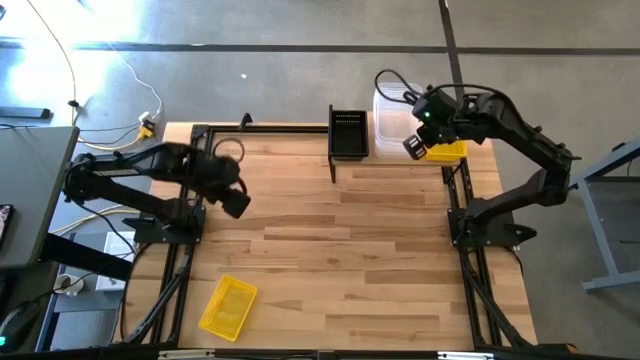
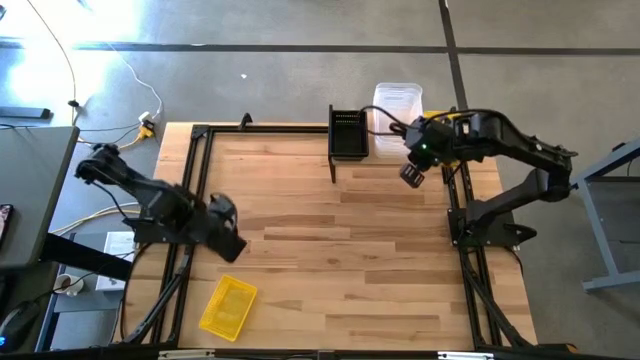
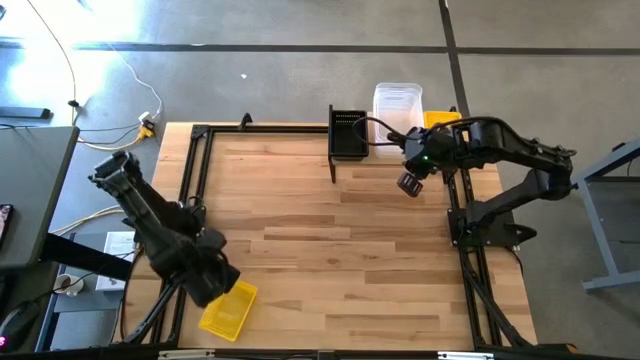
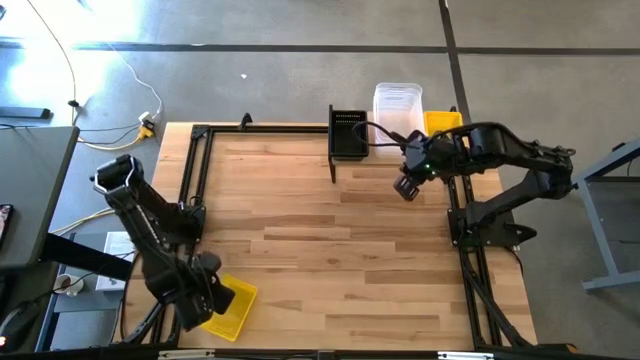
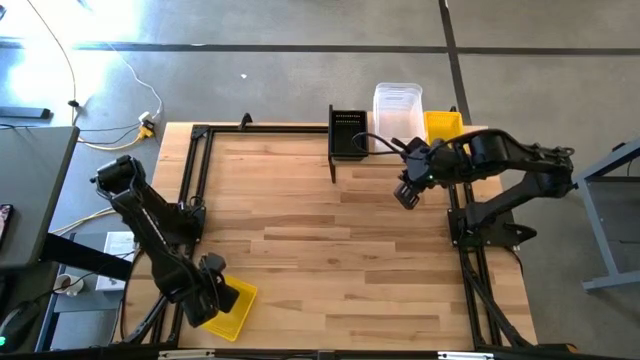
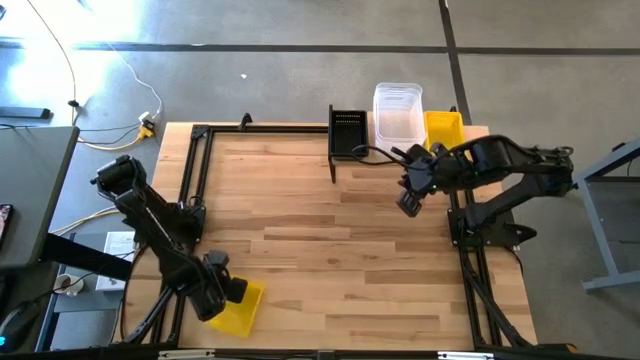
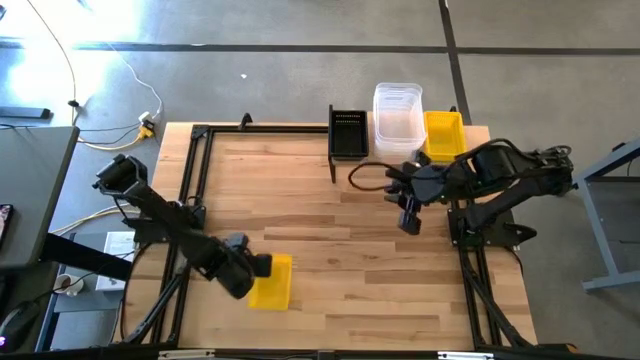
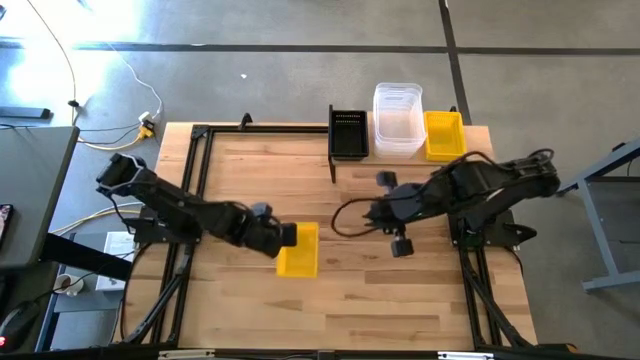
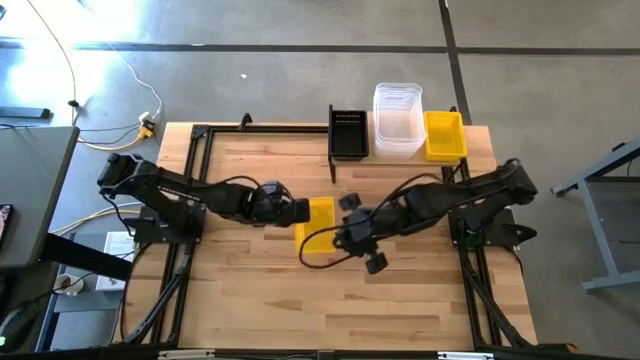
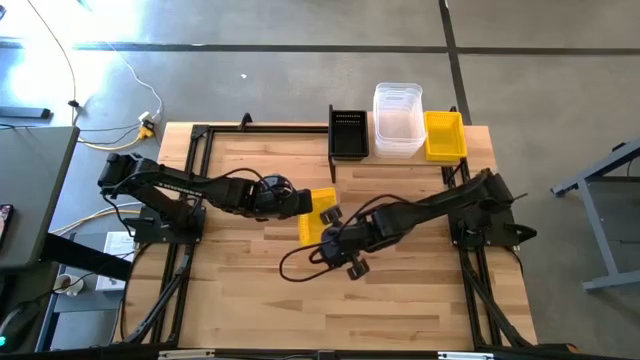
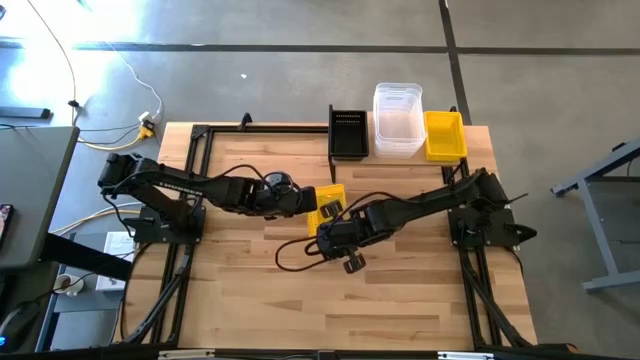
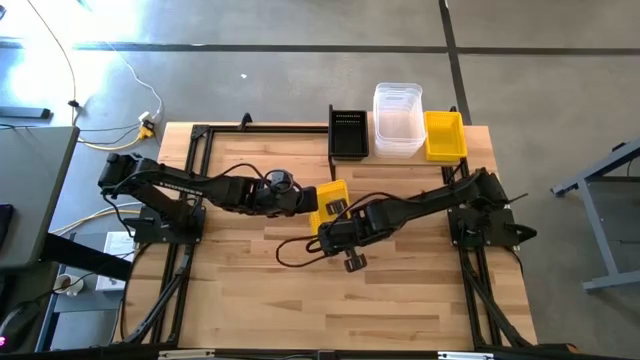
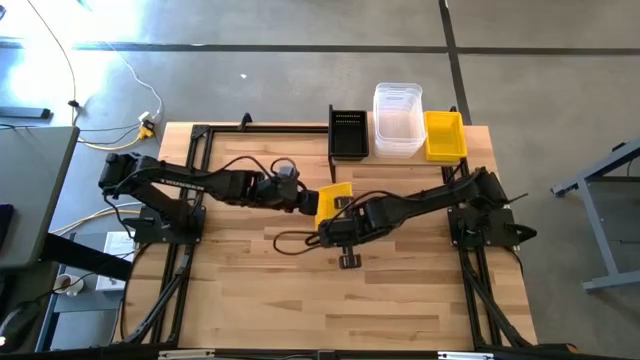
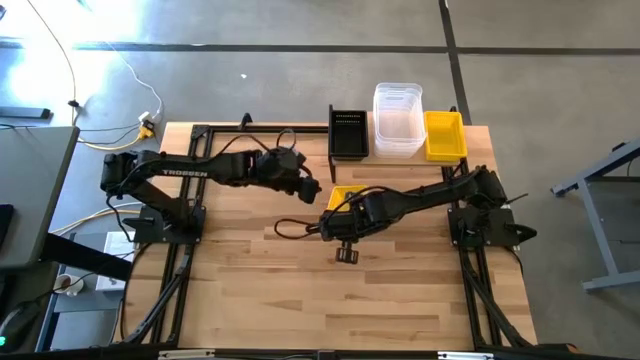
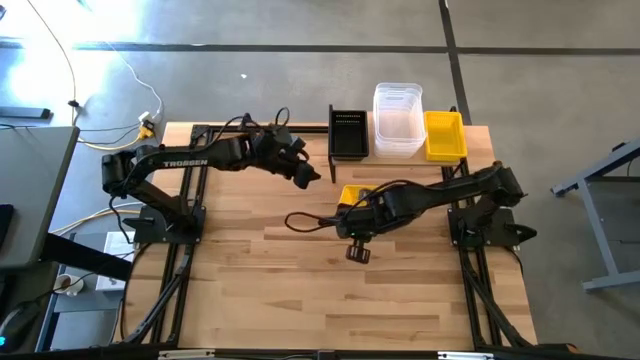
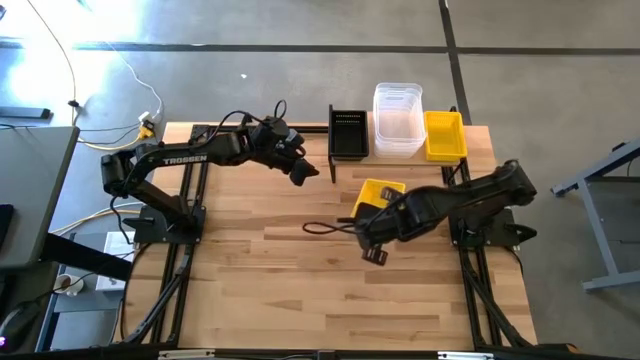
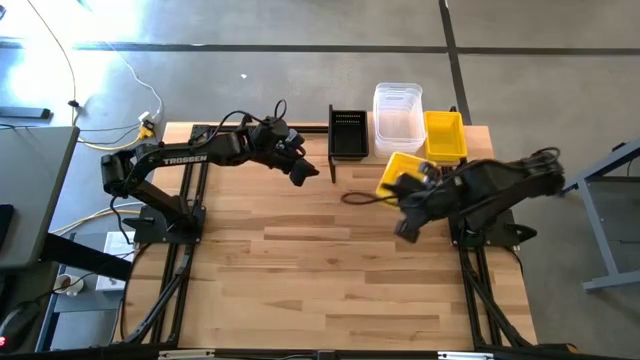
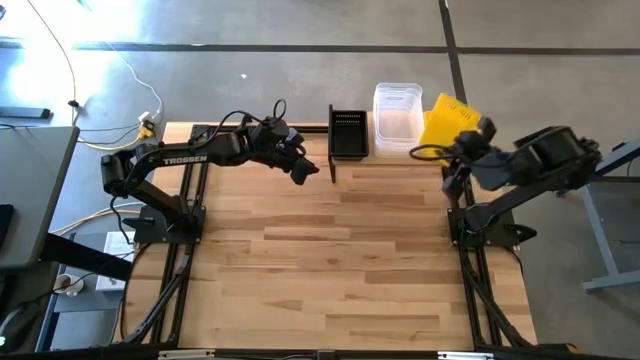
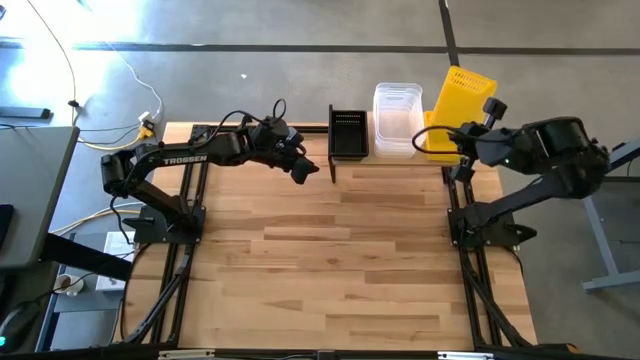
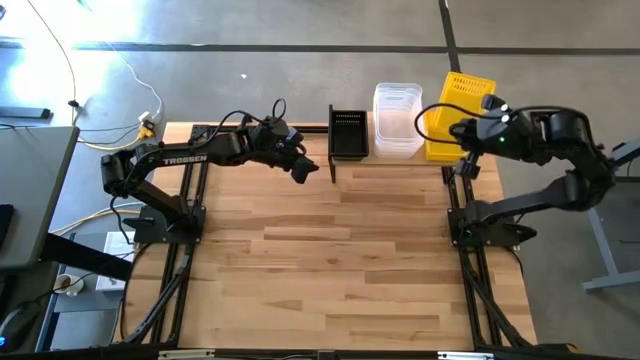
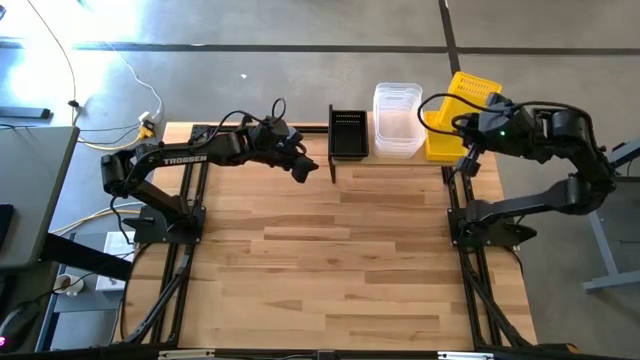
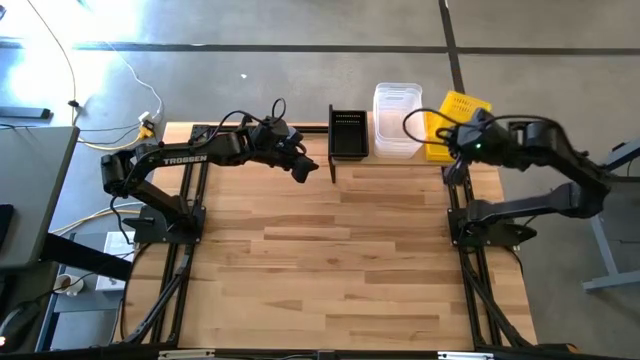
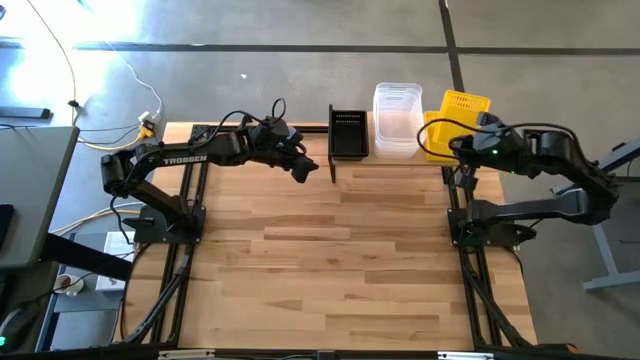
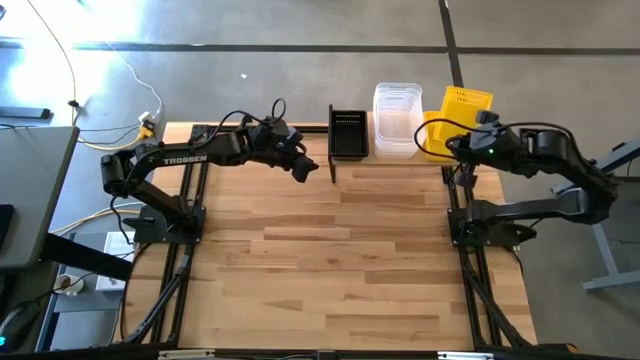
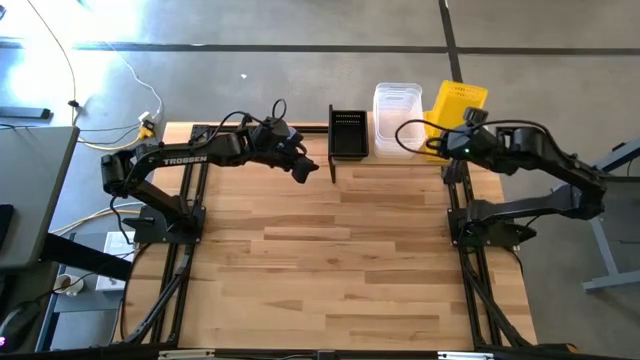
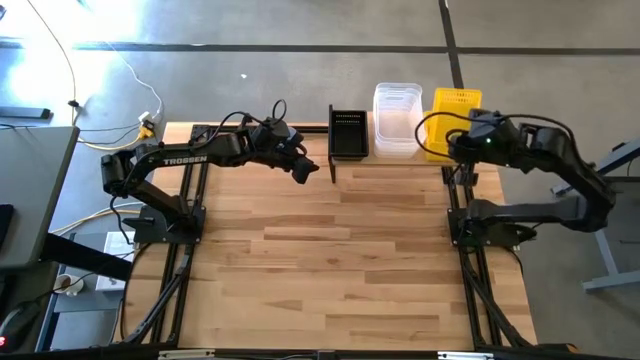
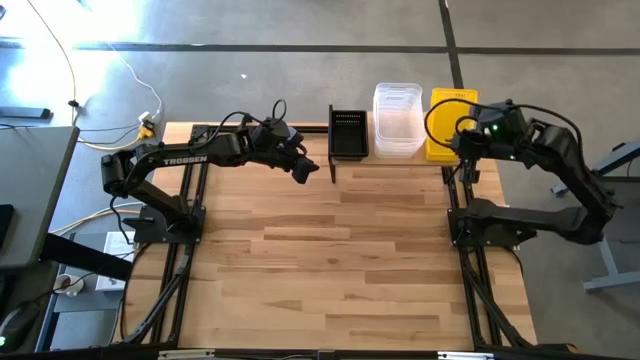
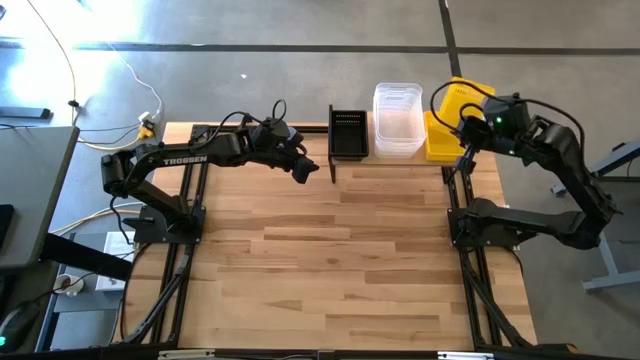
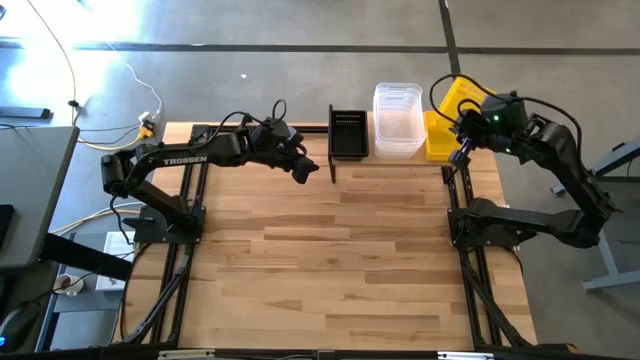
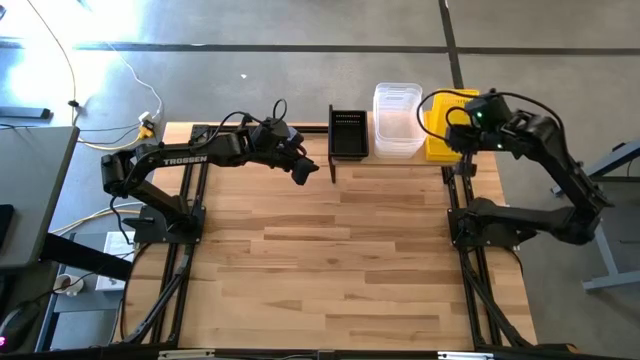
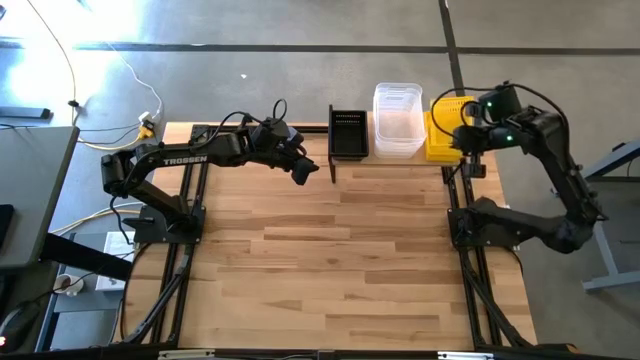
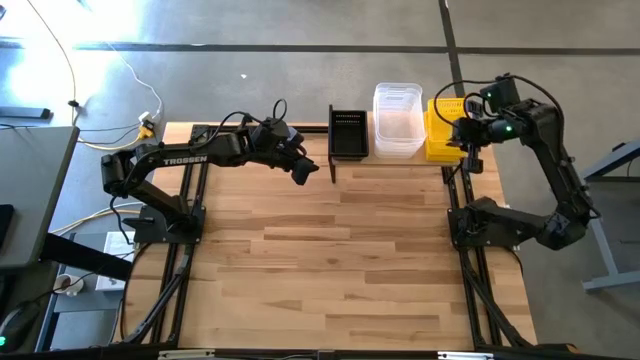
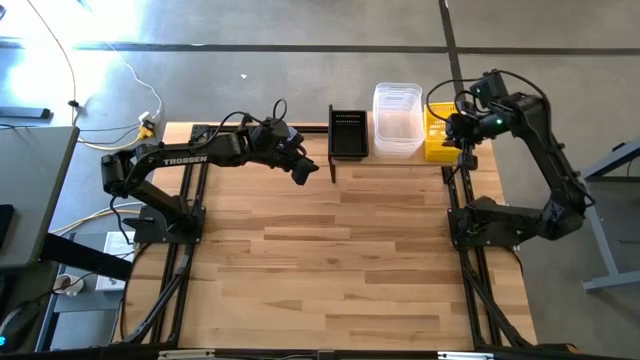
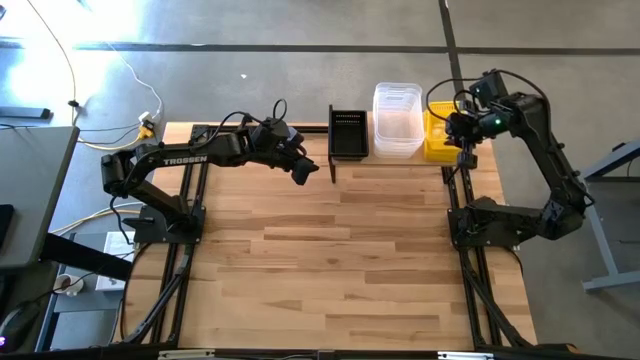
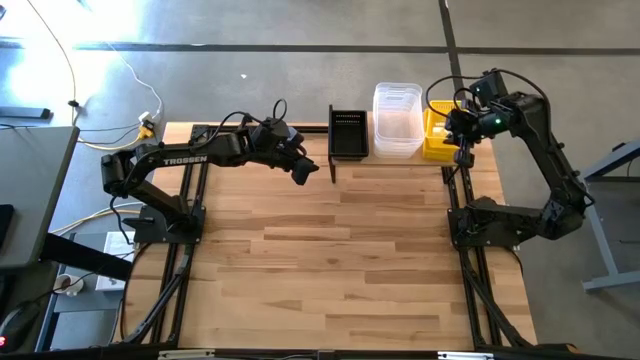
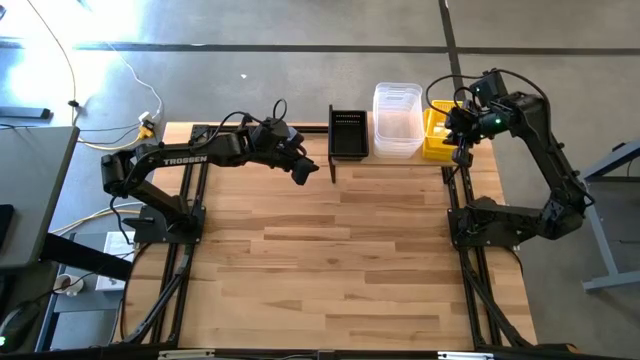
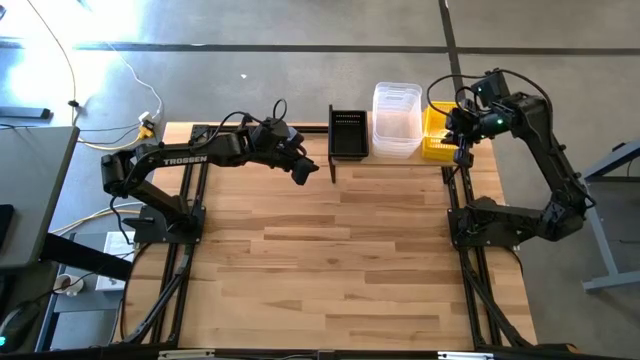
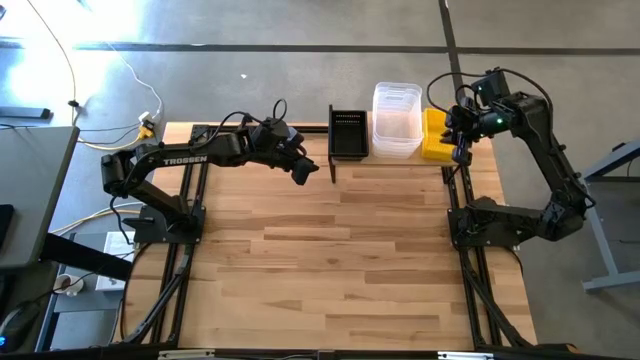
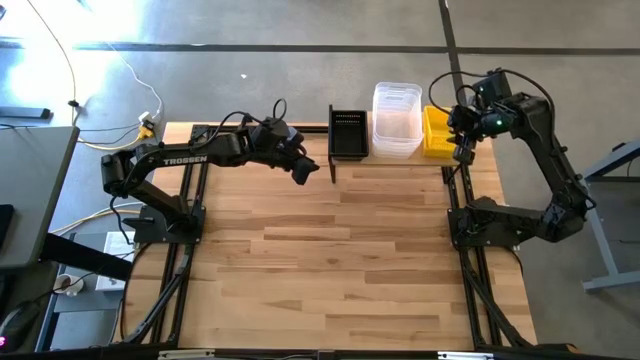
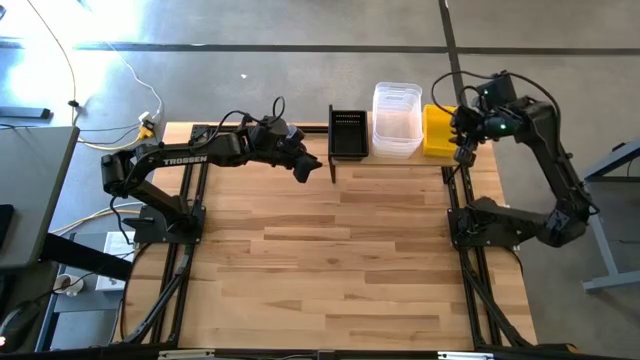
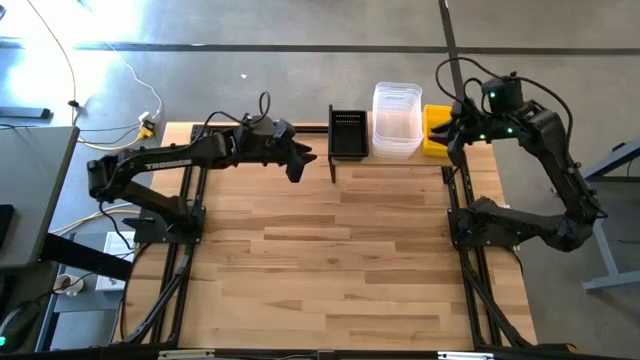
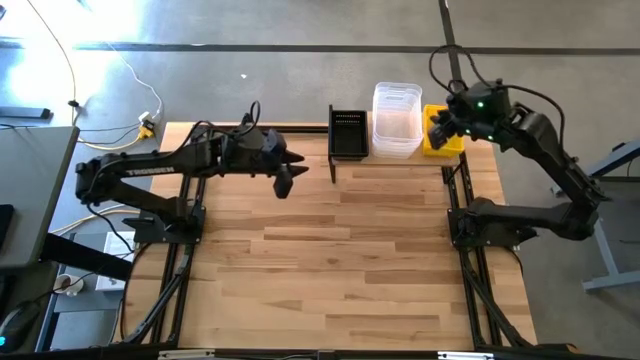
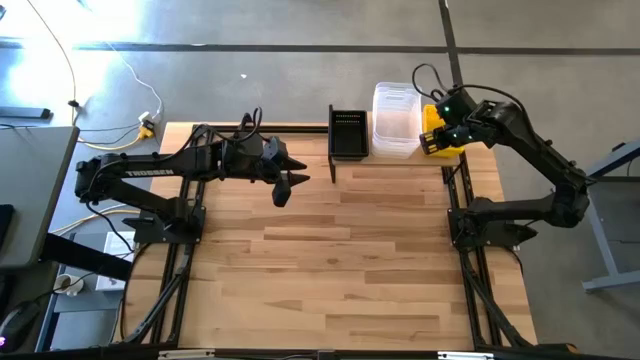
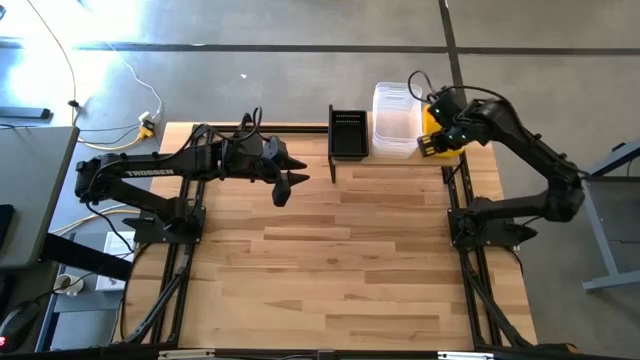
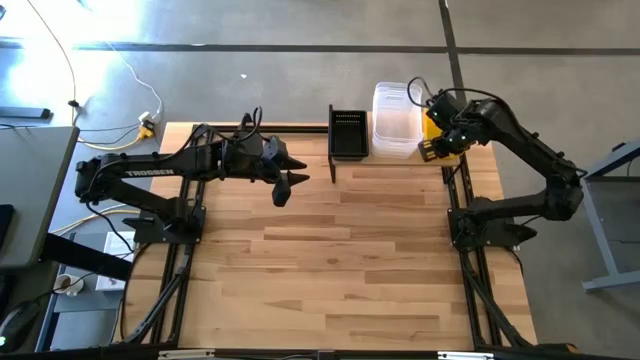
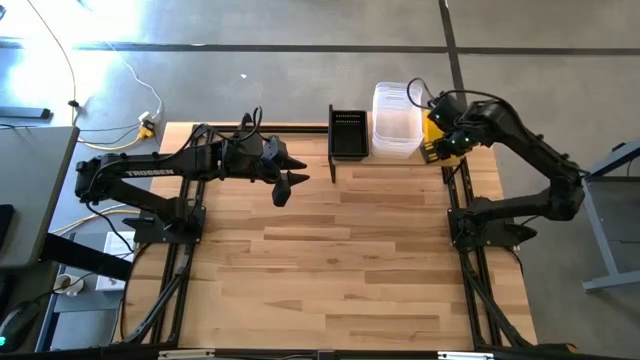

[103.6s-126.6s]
Task: Stack baskets on shelf by color
Stack the yellow bin on top of the stacked yellow bins on the shelf
